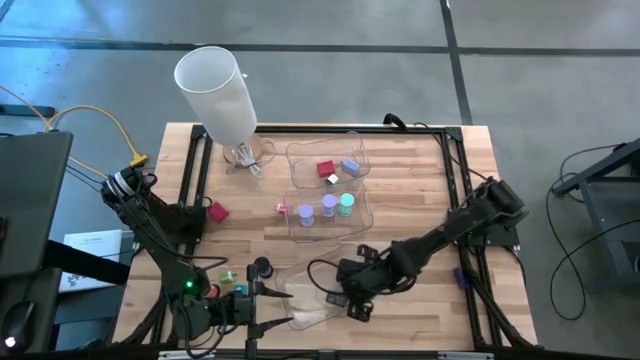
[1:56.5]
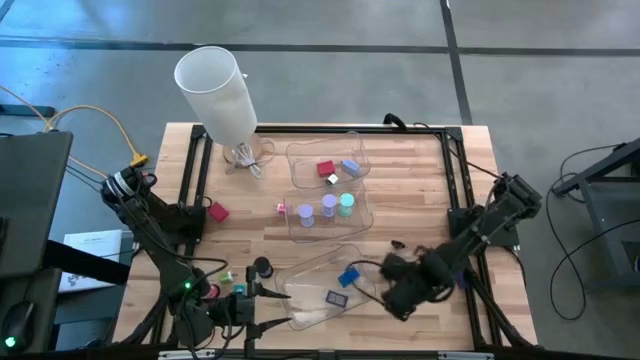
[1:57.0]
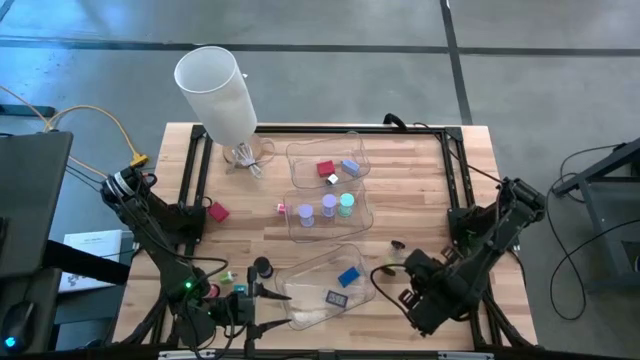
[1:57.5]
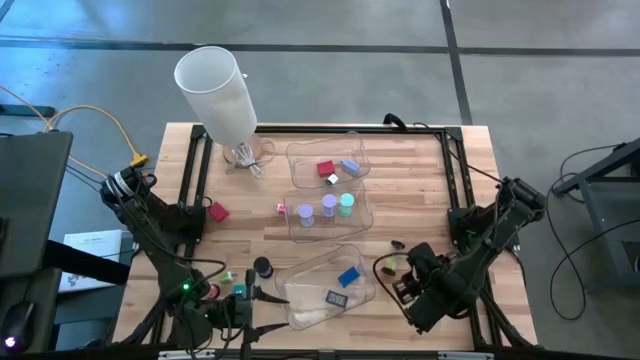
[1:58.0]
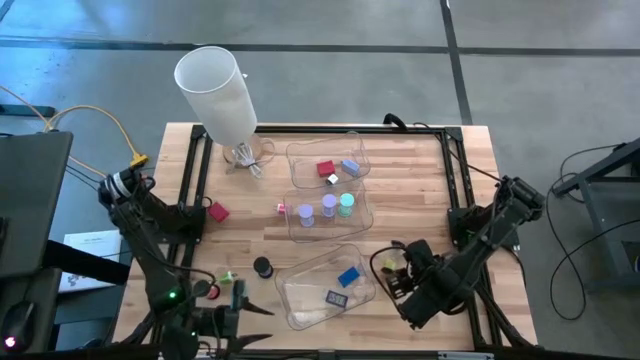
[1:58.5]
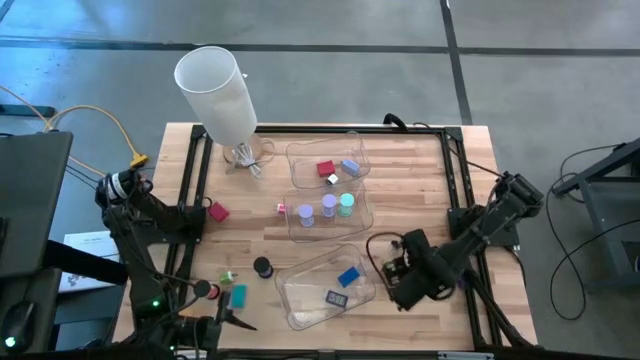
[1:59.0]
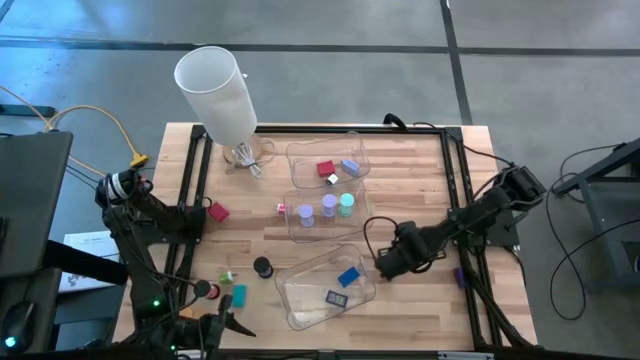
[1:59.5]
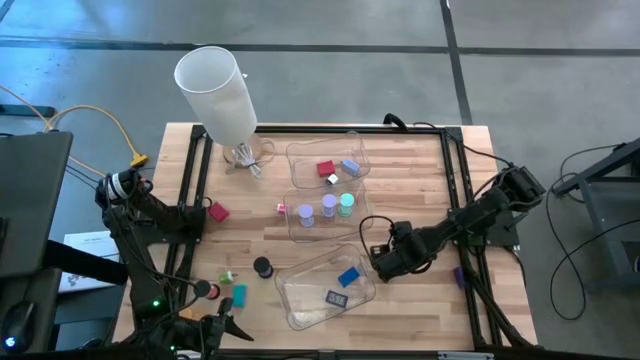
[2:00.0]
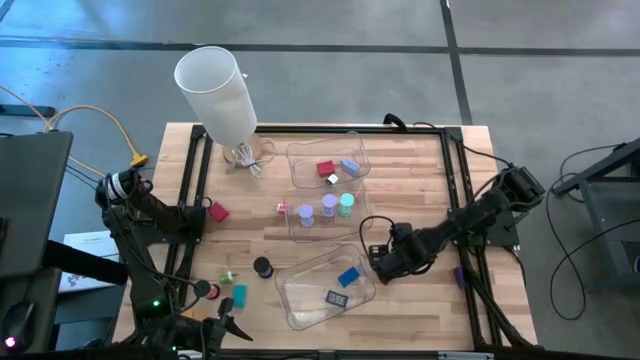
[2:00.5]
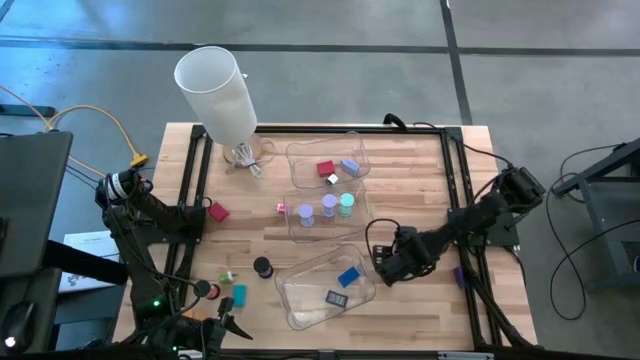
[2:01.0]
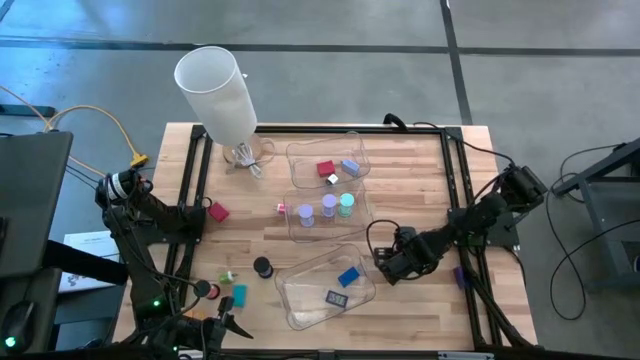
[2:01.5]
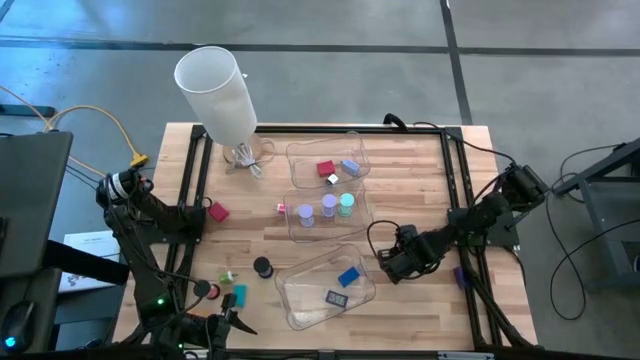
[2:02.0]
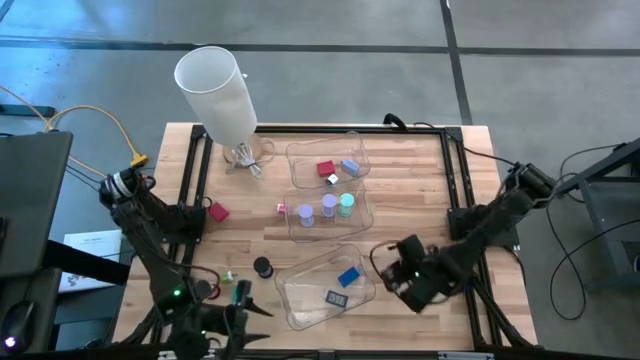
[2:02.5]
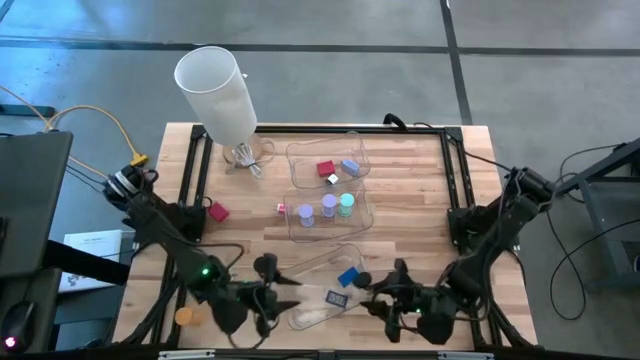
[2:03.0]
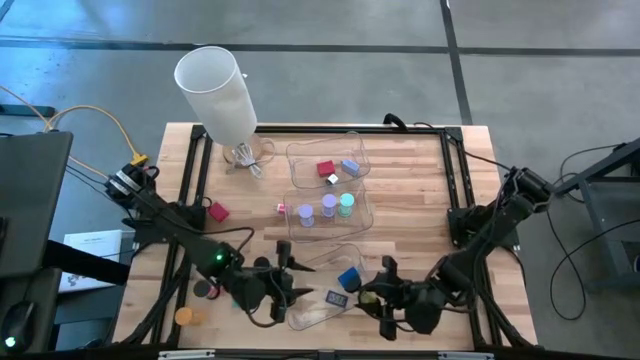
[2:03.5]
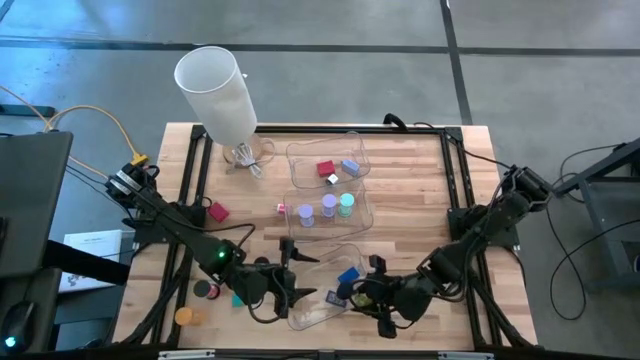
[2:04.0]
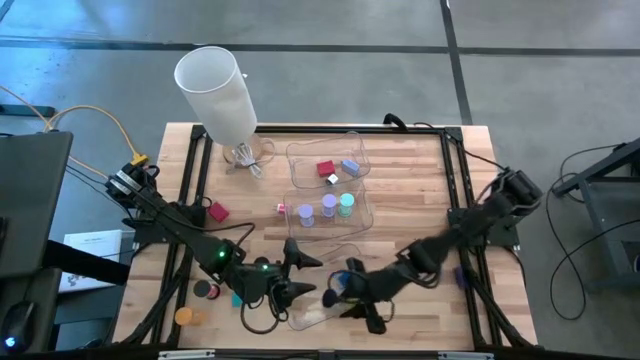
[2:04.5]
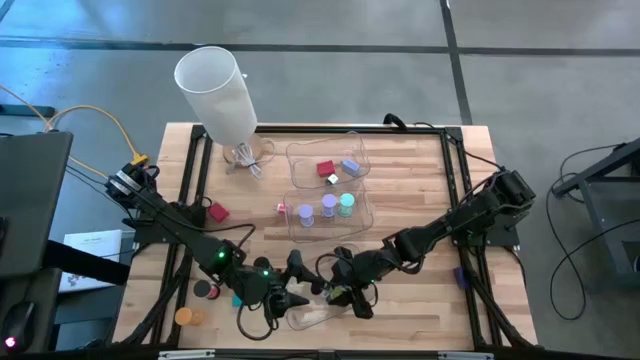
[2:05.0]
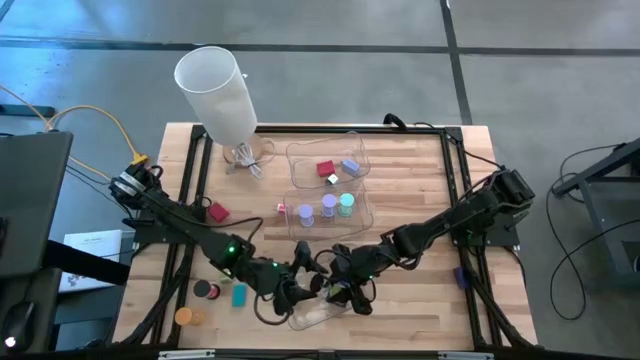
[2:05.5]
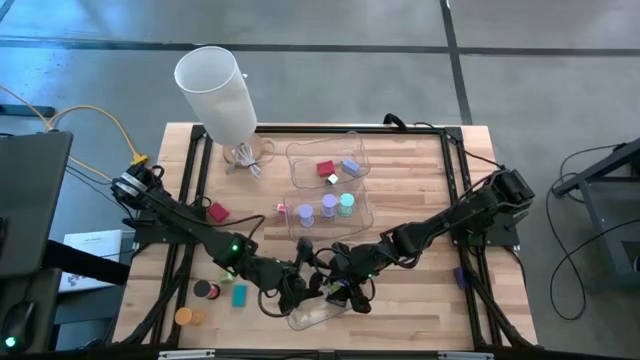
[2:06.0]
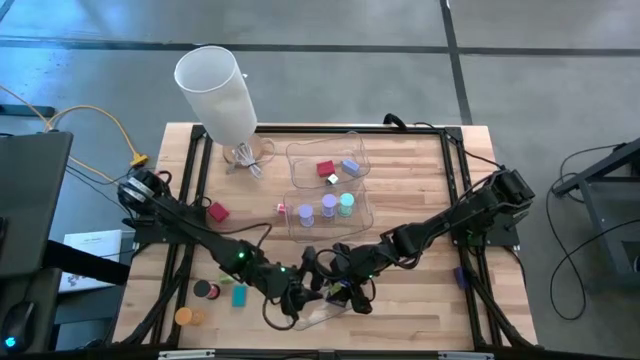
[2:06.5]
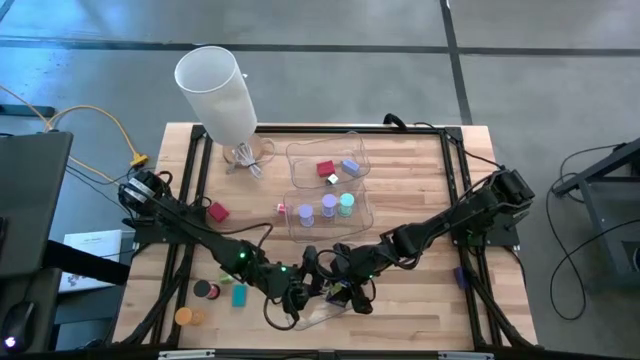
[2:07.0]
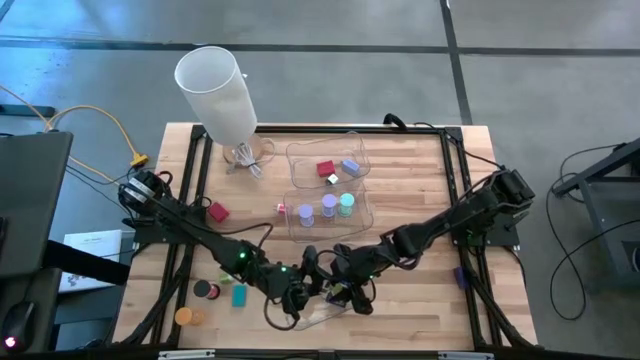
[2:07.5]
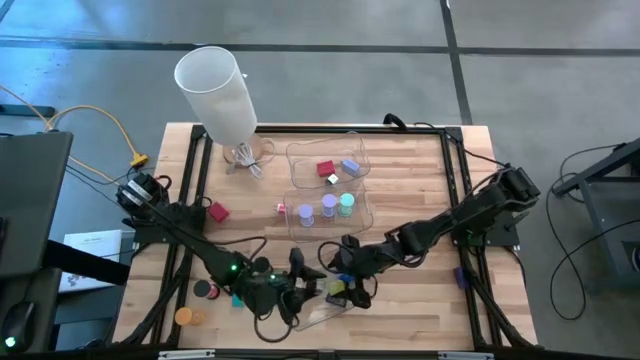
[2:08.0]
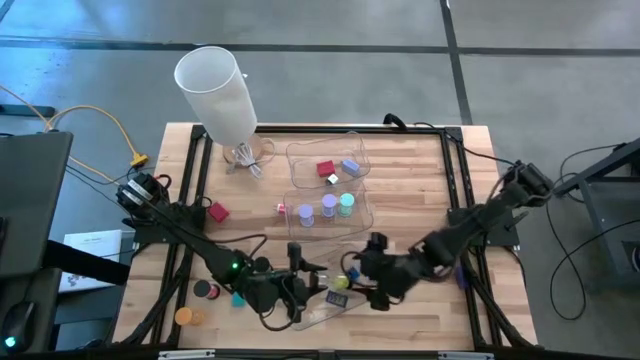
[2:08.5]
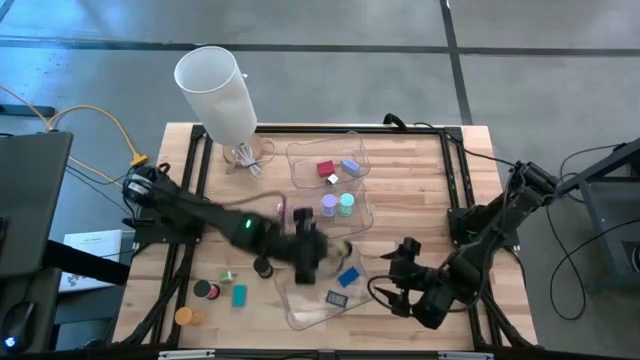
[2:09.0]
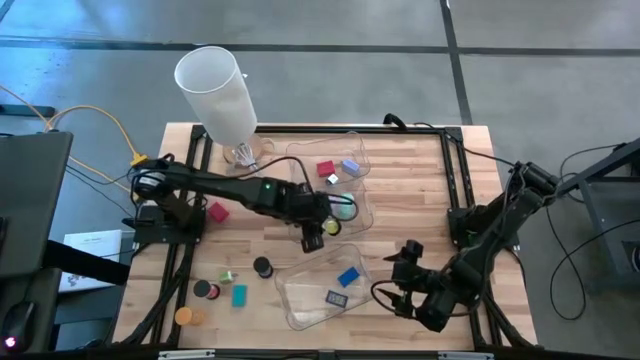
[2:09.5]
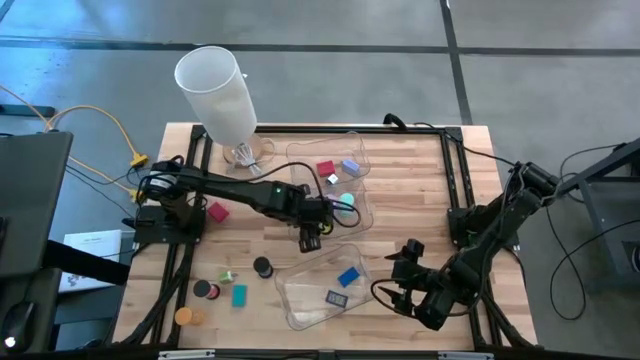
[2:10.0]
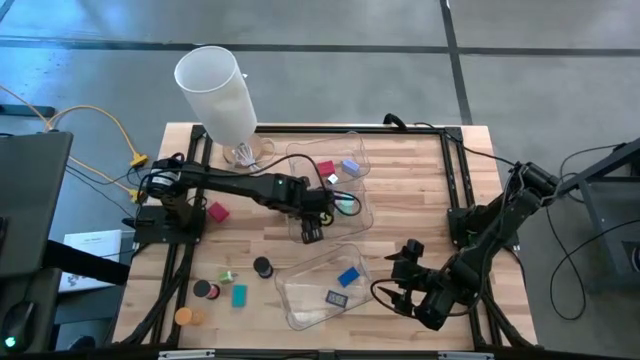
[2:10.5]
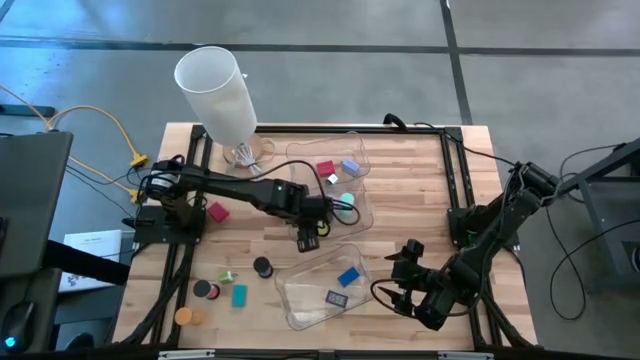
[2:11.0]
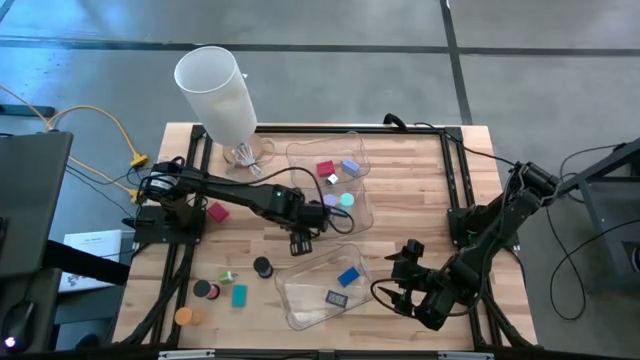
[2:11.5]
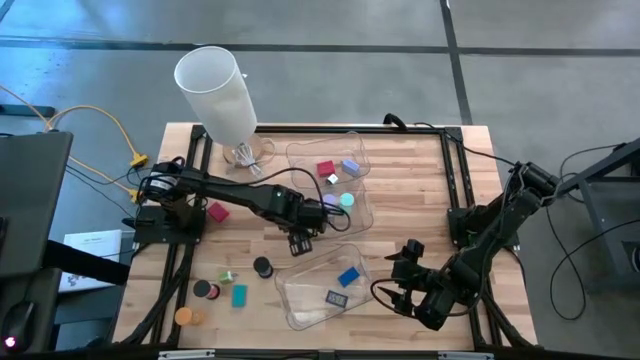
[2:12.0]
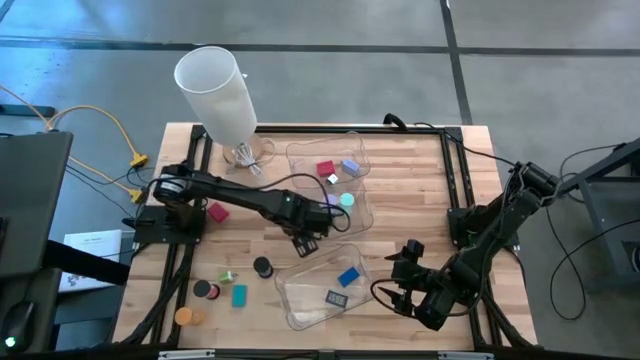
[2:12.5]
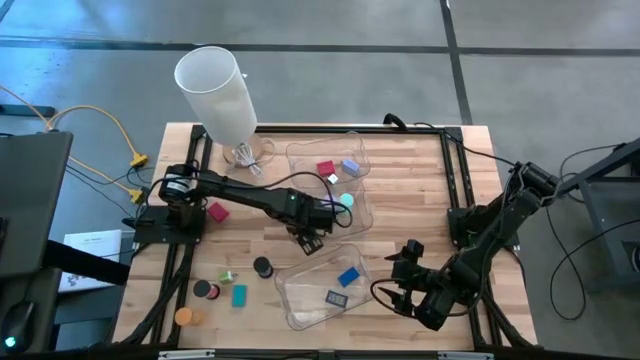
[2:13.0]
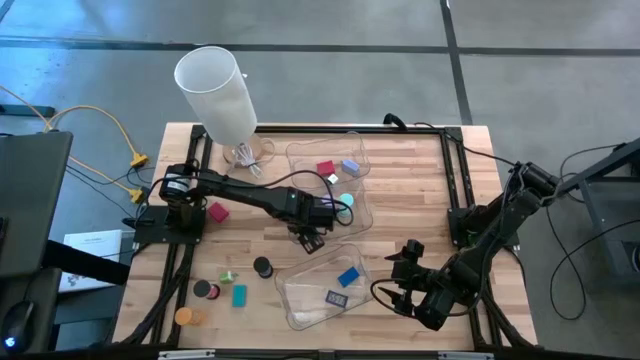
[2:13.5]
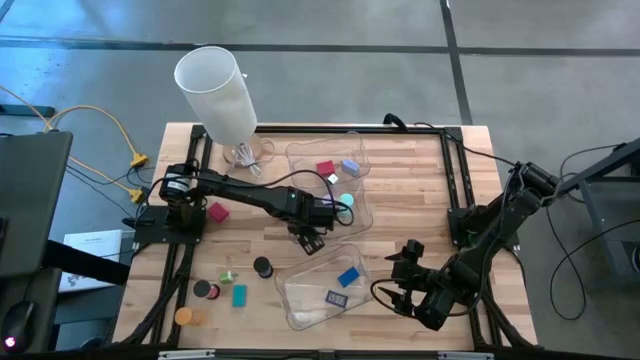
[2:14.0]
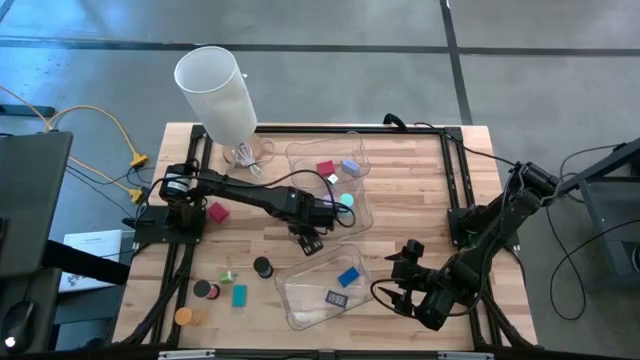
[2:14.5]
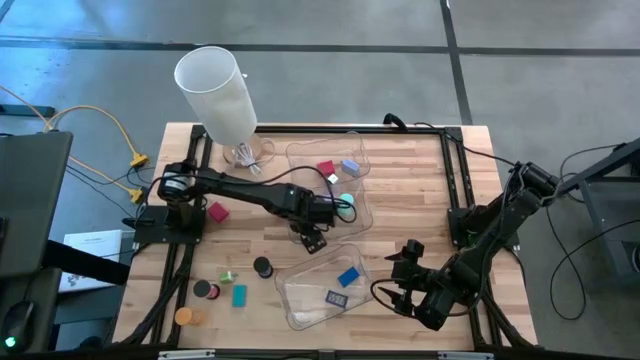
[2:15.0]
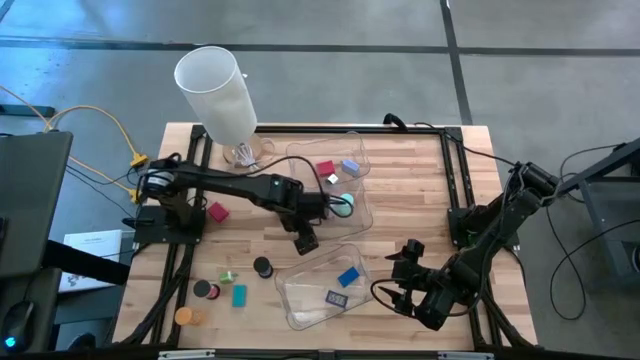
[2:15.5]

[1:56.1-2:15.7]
Task: Pick & Place Office items
Put the green hourglass into the middle transparent bin

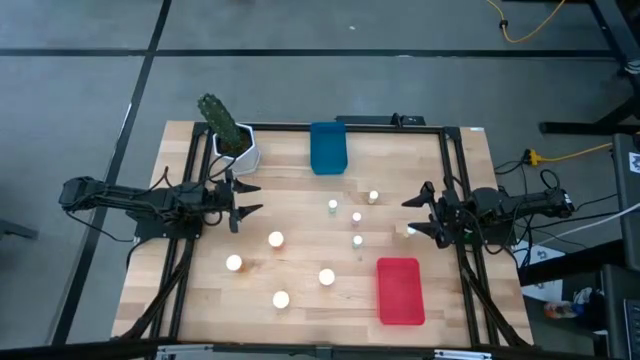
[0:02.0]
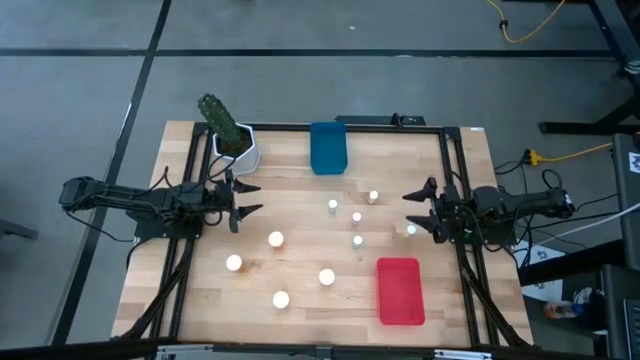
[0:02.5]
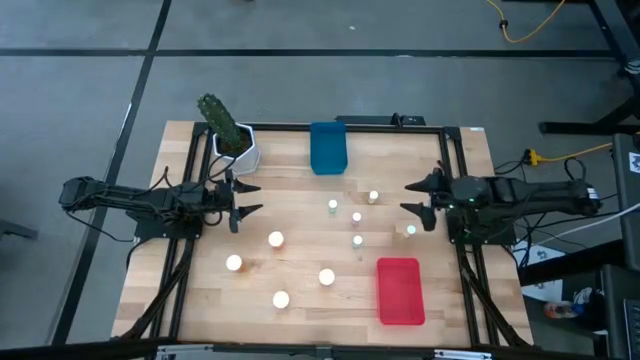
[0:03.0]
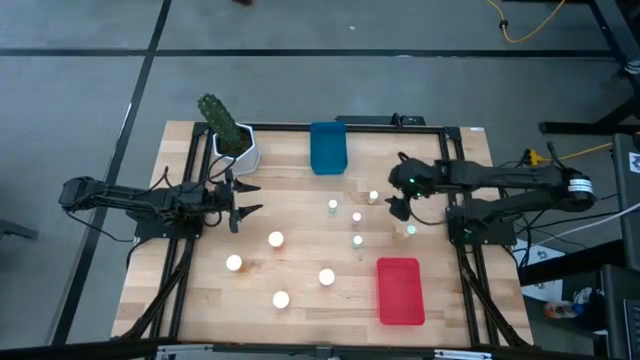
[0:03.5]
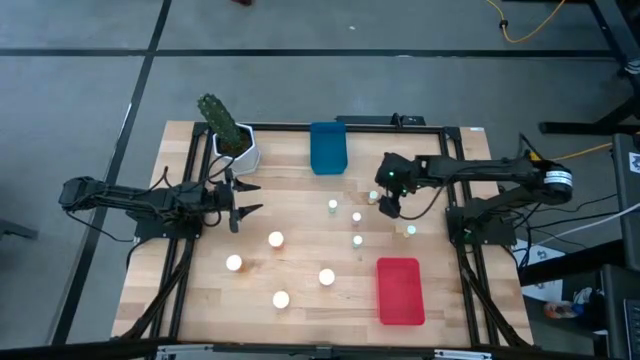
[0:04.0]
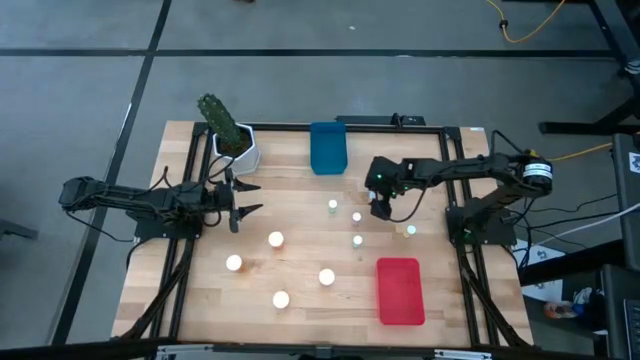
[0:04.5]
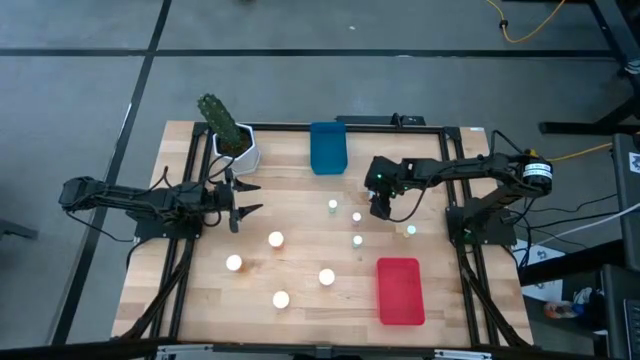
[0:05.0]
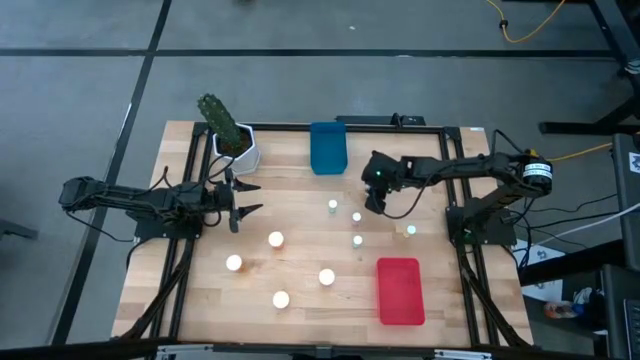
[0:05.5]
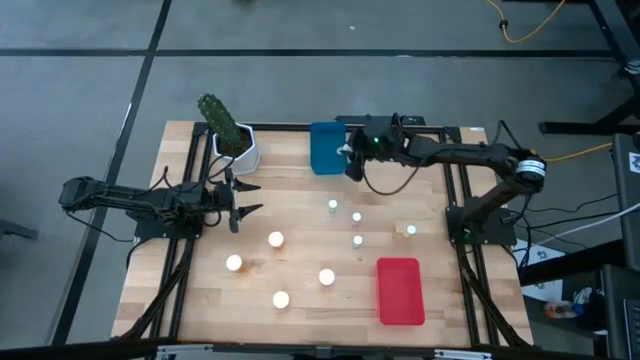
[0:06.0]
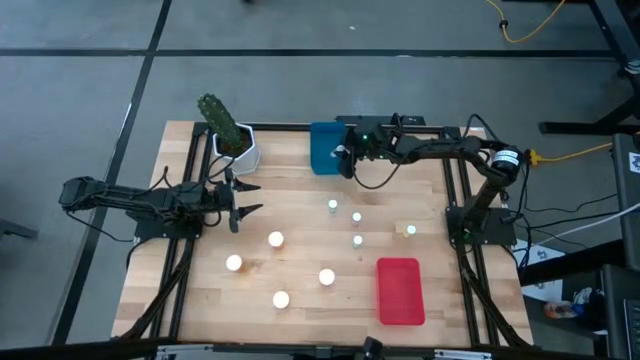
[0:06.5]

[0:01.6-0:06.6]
Task: Pick and place medicine bottles into bin by pill shape (circle, oval)
Put the small yellow pill bottle into the blue bin
